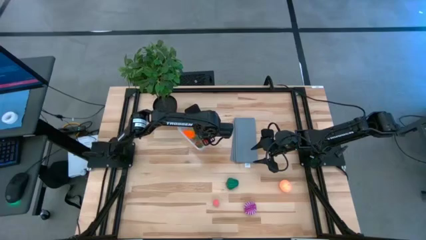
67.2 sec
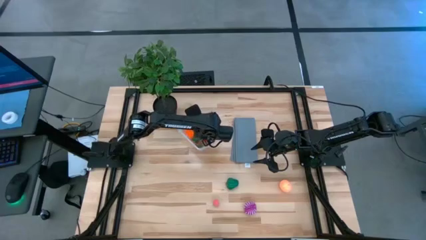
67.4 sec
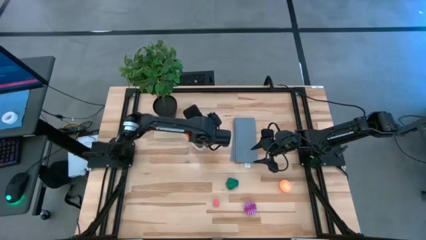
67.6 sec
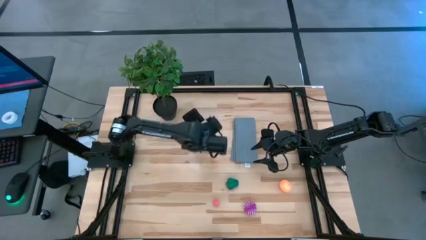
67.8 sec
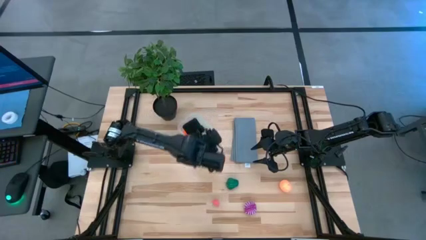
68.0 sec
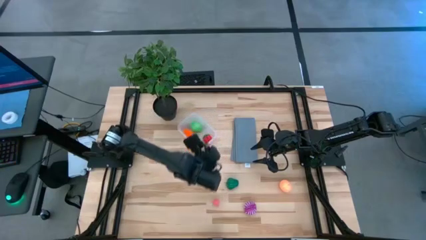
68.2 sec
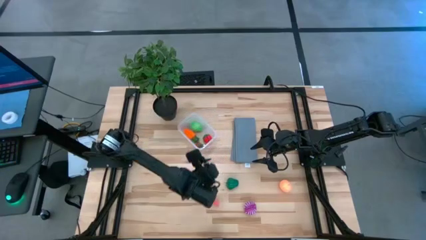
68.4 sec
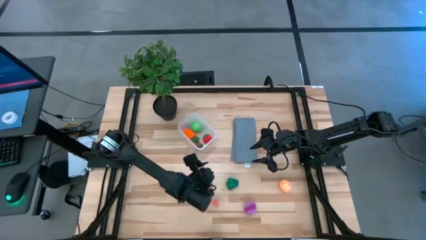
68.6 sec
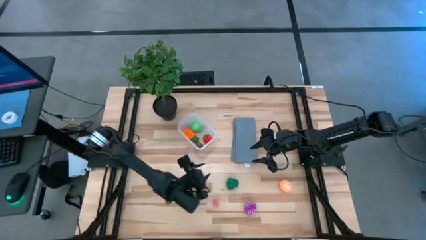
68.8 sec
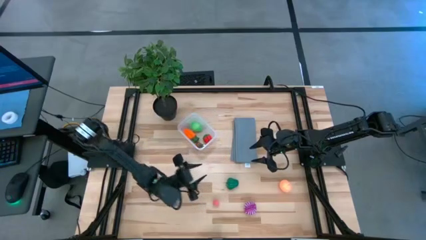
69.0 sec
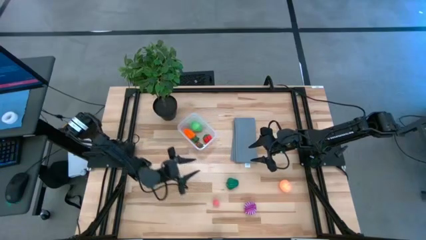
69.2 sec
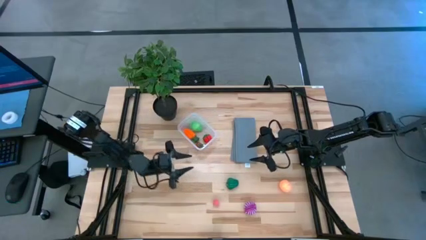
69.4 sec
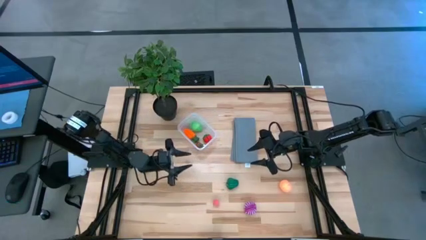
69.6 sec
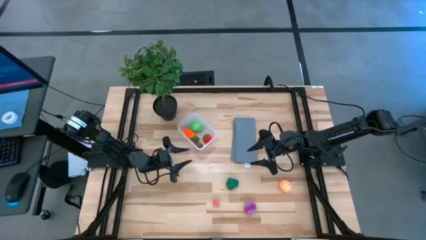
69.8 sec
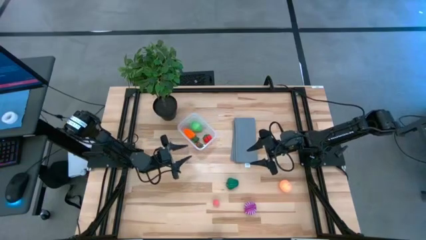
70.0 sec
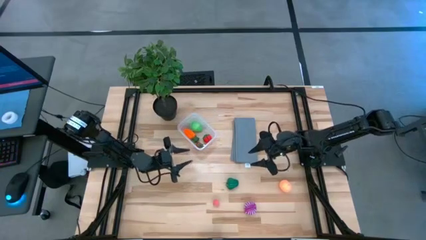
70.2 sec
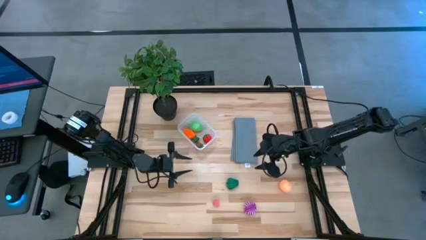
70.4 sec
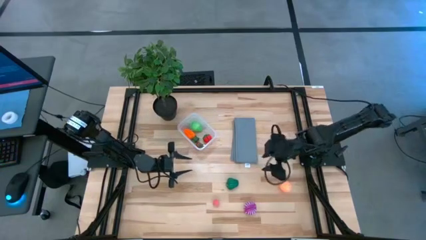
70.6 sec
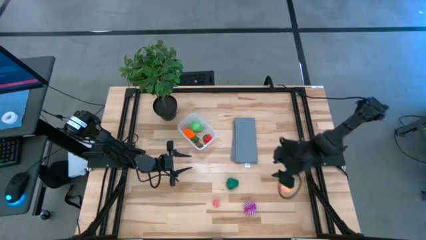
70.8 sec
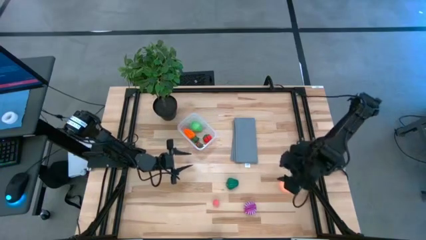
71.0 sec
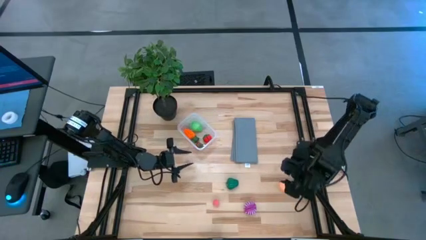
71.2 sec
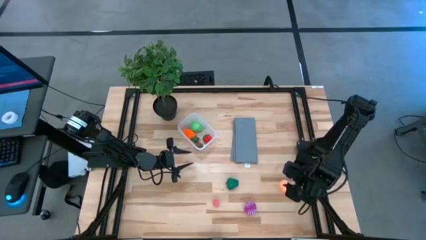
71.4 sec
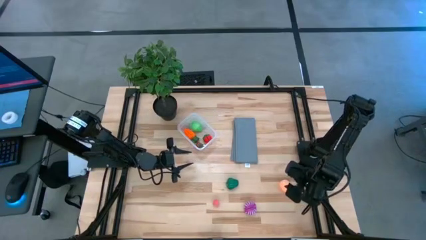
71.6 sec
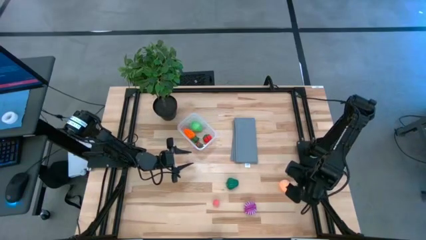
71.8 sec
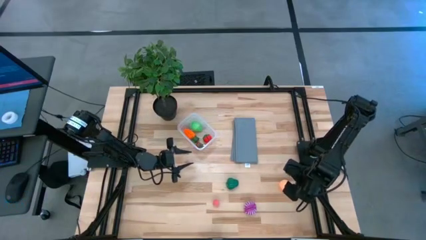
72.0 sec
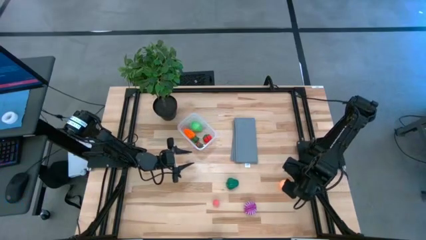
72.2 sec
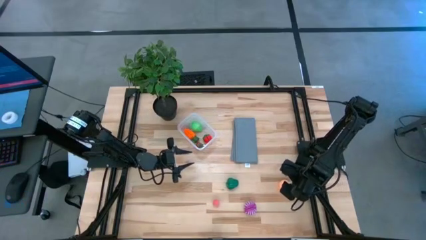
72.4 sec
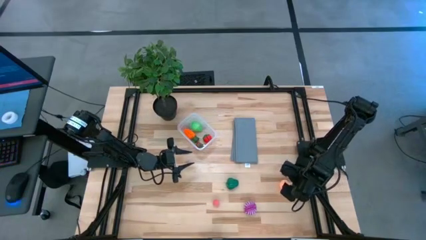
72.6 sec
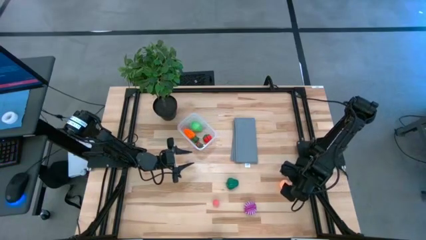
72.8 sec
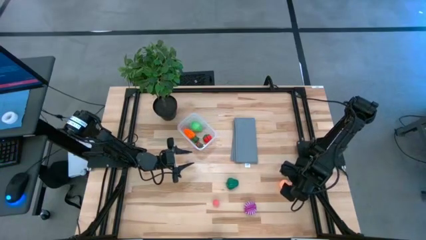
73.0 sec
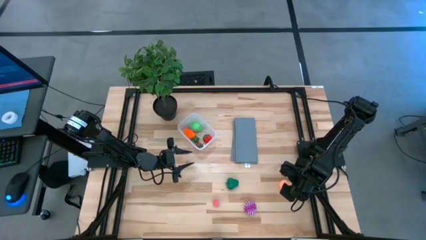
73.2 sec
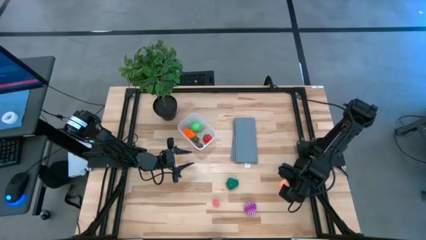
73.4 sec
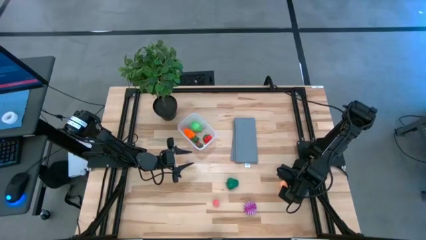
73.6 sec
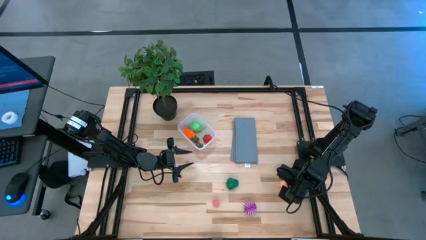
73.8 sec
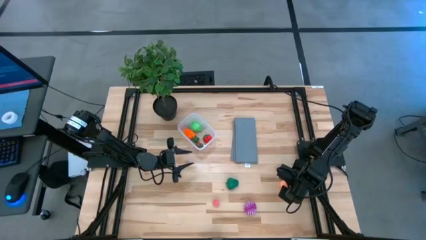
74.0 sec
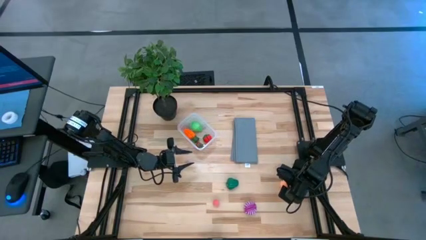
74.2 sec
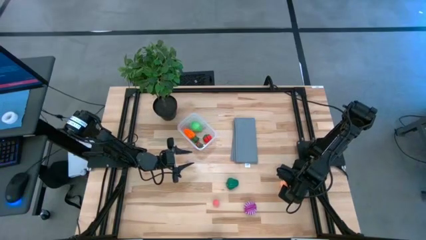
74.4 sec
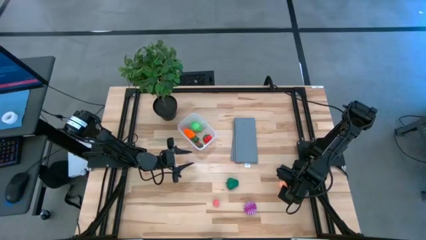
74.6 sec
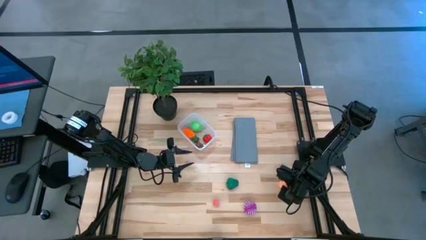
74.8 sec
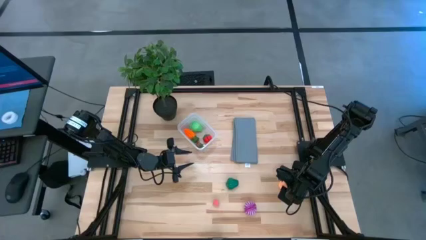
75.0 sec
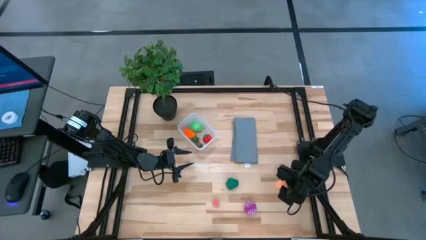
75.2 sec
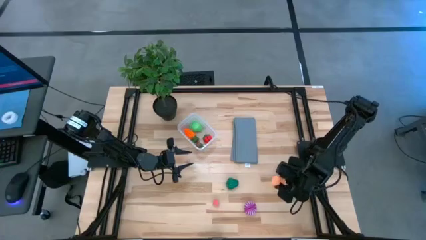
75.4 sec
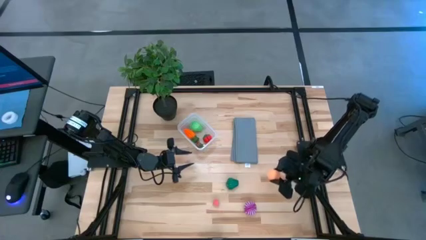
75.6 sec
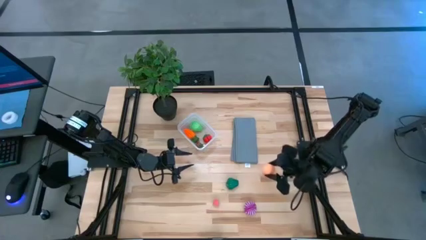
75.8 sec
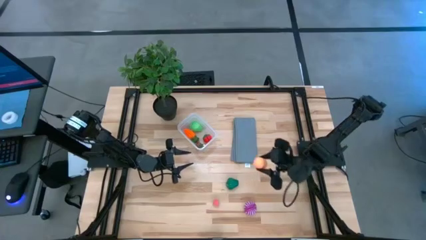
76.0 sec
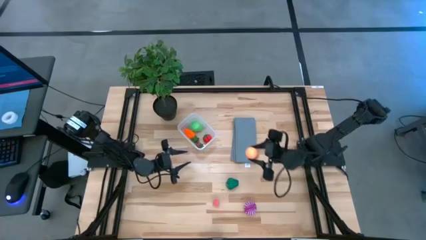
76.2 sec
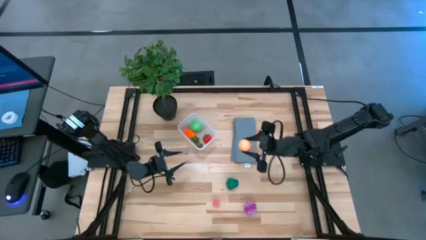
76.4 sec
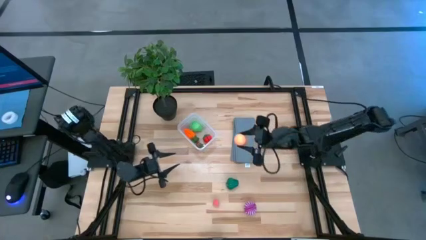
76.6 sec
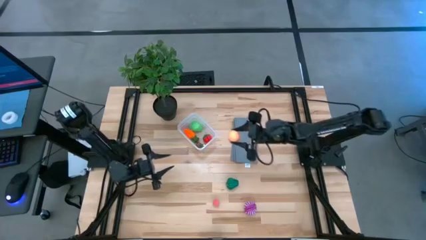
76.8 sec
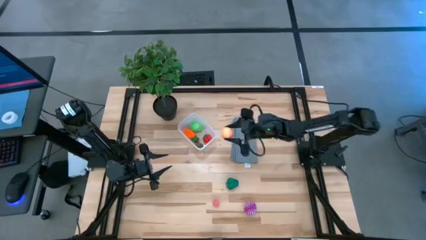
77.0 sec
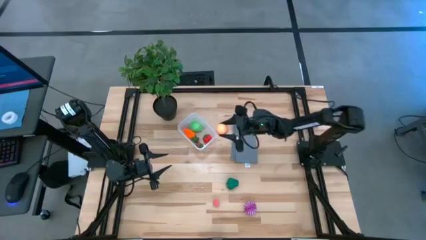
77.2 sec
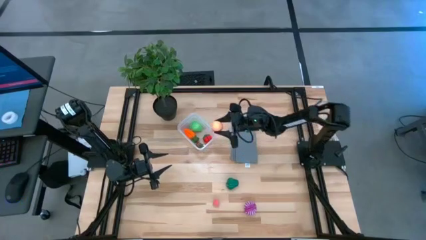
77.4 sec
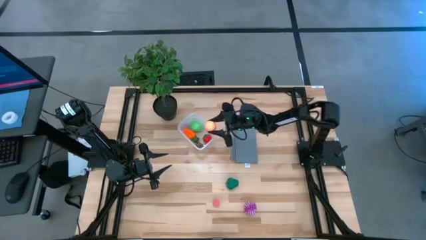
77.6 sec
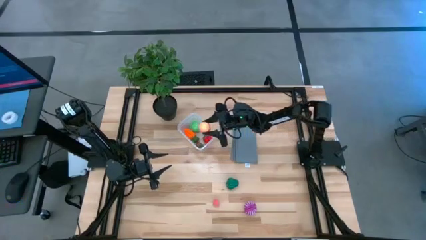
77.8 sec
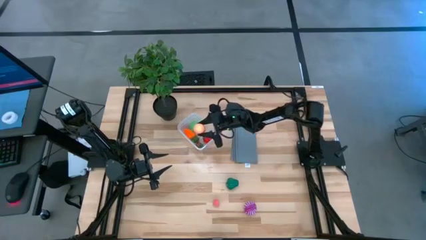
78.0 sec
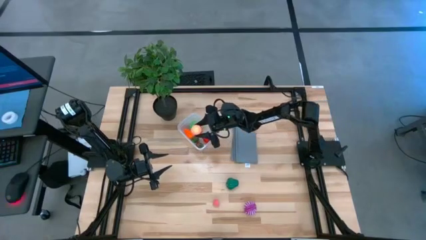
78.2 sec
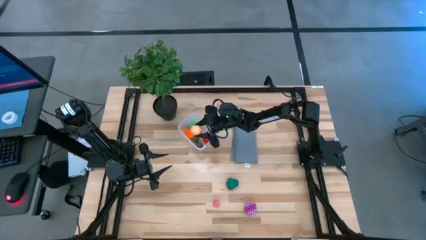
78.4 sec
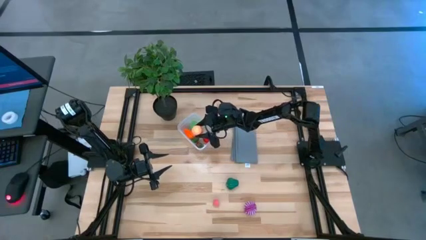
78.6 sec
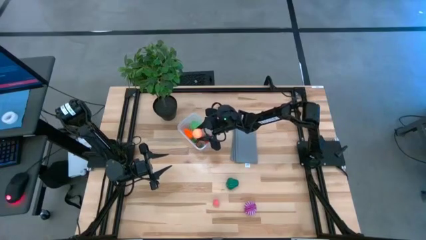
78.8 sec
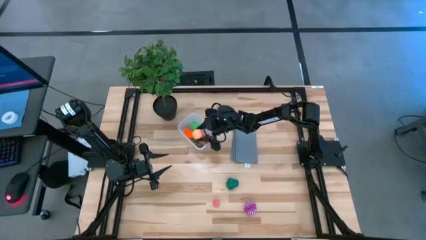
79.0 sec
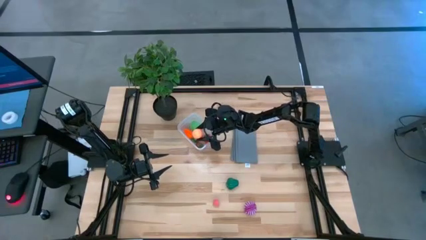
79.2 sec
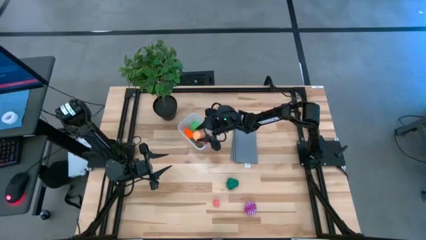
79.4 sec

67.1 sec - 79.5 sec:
Task: Pick and placing Produce into tupperware
Put the orange peach into the transparent bin

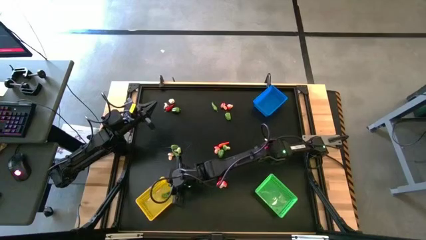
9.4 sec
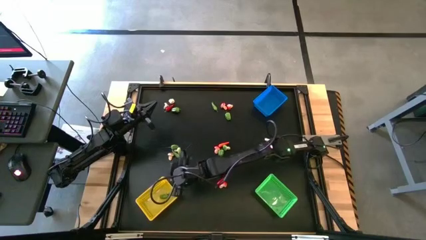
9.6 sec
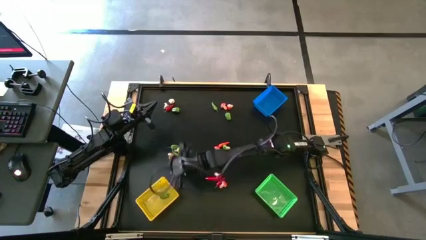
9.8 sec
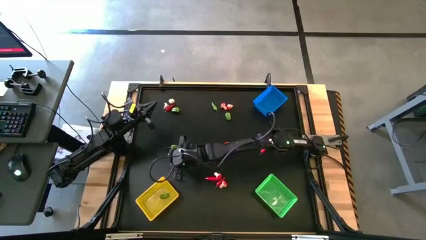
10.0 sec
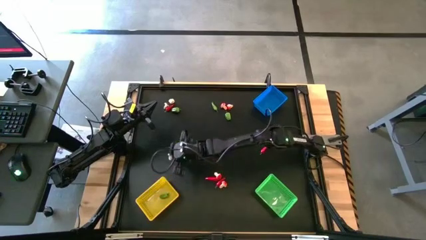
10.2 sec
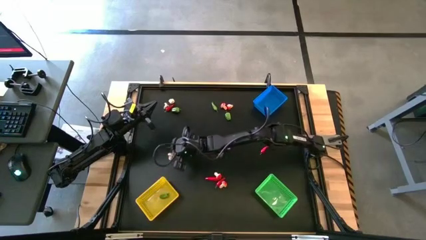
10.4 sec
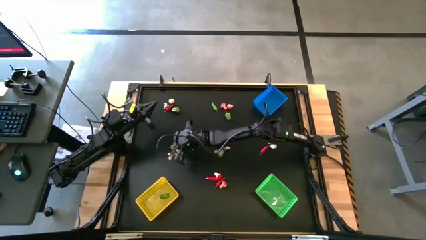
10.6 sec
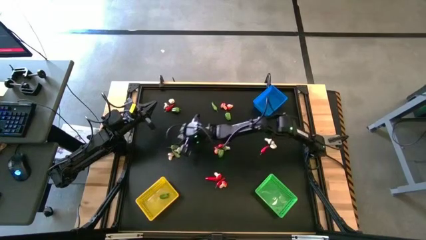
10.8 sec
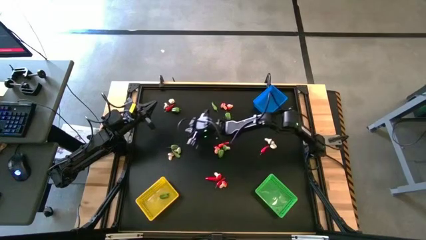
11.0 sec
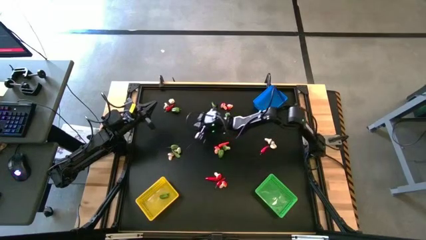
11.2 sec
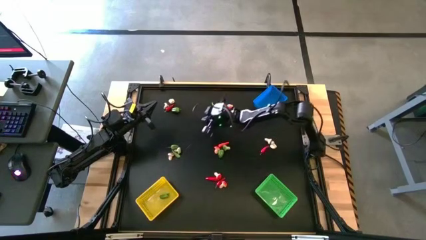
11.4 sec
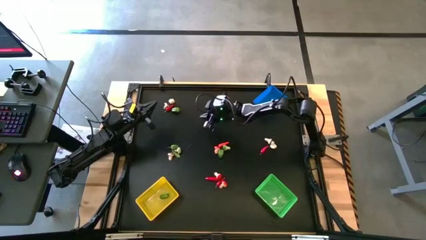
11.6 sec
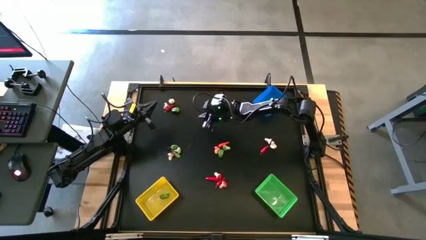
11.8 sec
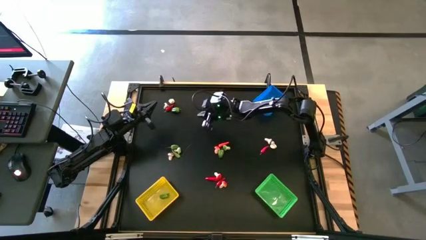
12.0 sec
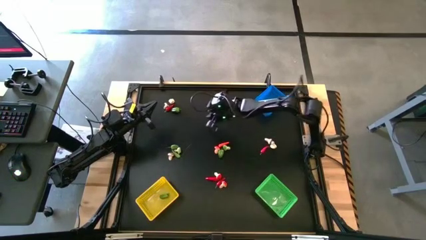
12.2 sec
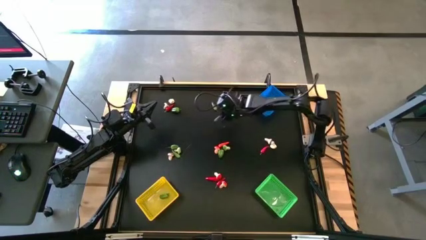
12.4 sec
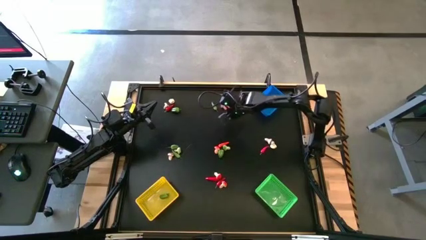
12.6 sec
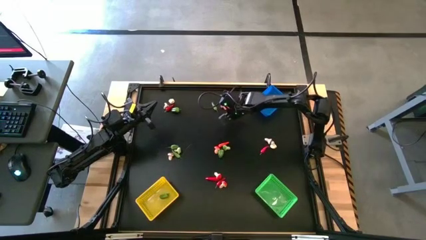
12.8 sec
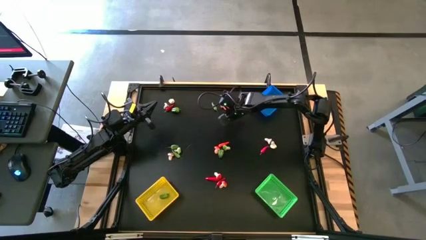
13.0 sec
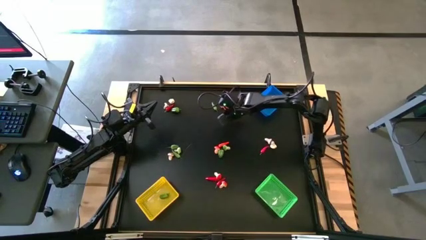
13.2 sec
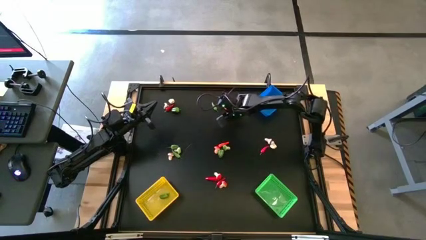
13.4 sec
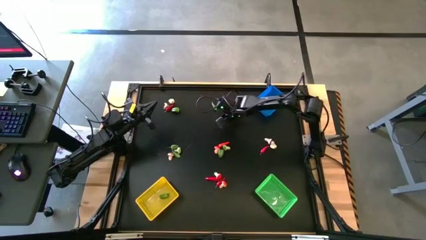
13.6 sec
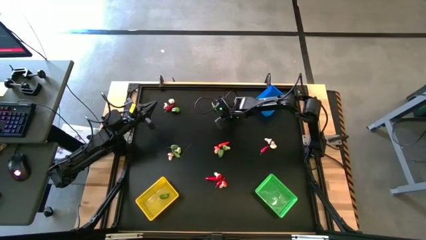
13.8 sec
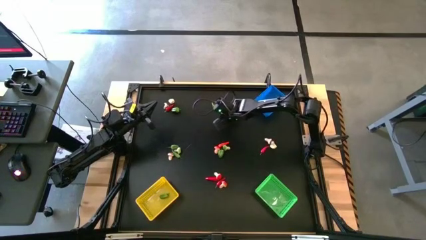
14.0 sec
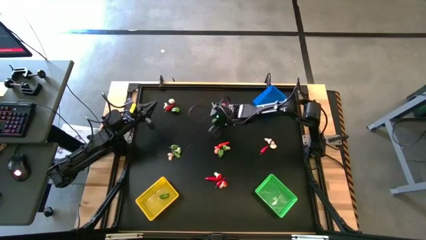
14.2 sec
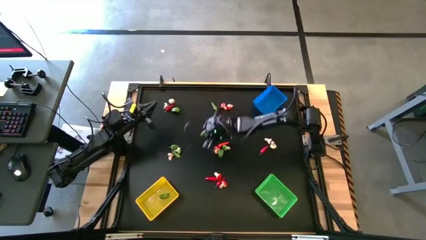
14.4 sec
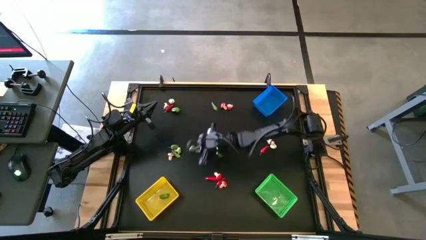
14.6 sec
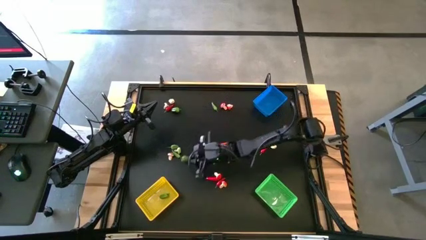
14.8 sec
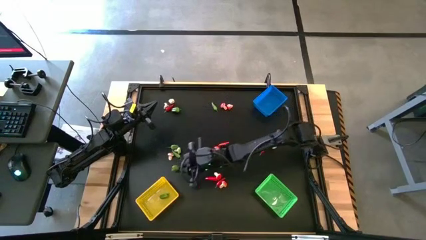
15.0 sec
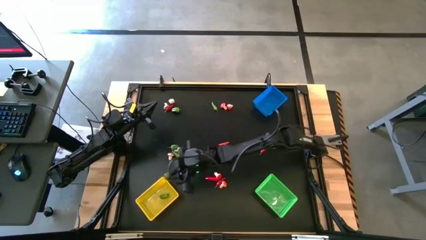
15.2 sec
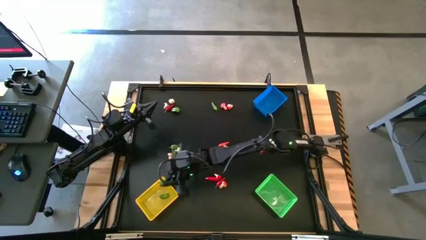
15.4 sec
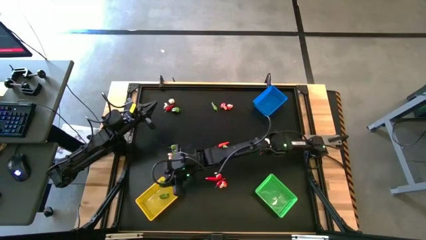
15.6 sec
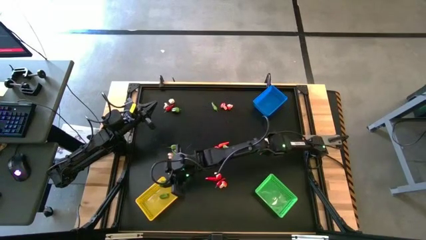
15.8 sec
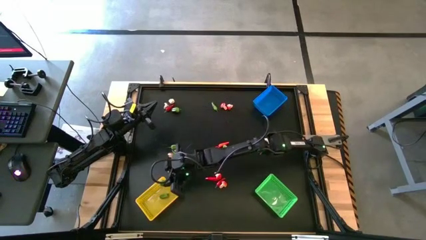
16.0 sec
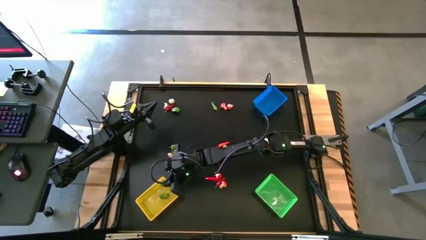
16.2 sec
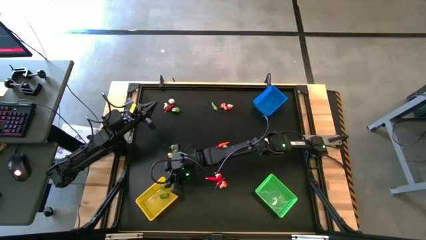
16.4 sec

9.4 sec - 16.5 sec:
Task: Sort produce into baskets
Put the green chili pepper into the yellow bin
